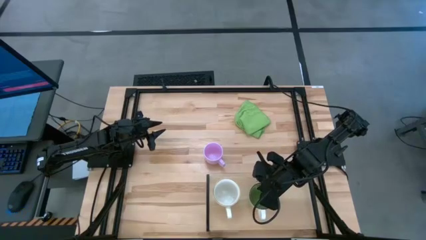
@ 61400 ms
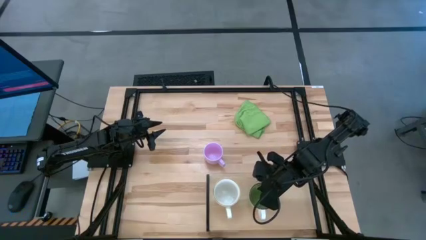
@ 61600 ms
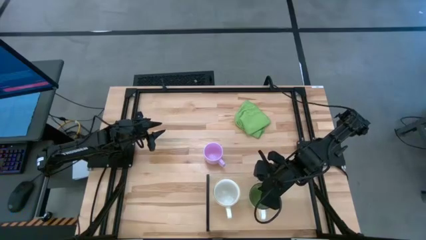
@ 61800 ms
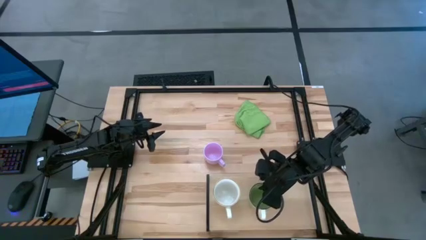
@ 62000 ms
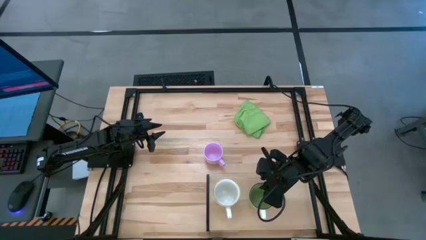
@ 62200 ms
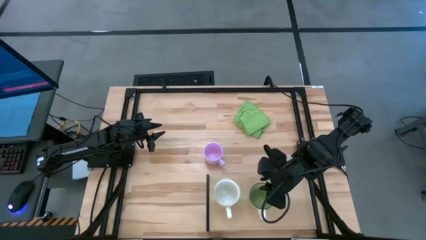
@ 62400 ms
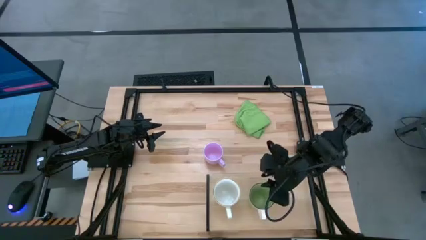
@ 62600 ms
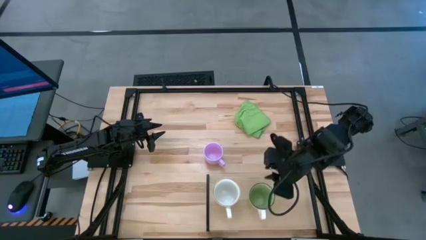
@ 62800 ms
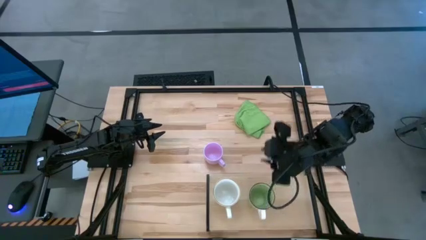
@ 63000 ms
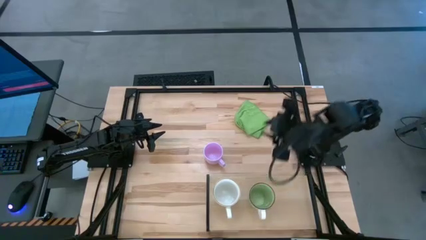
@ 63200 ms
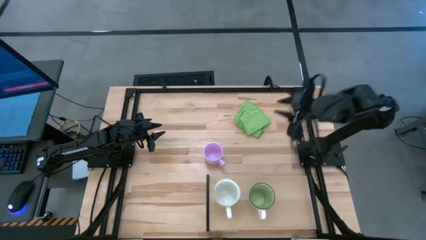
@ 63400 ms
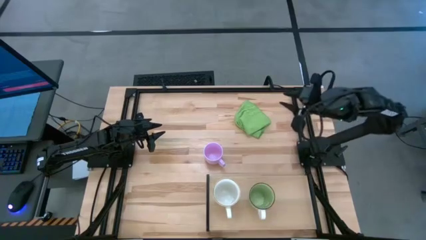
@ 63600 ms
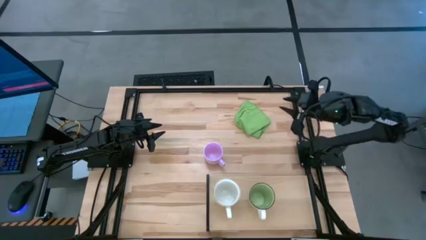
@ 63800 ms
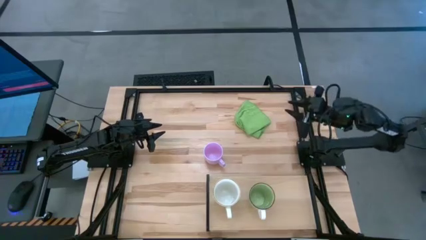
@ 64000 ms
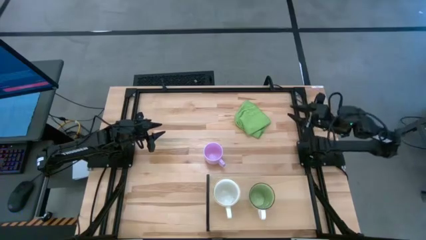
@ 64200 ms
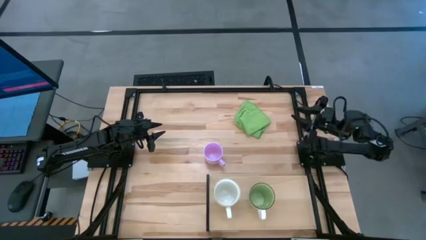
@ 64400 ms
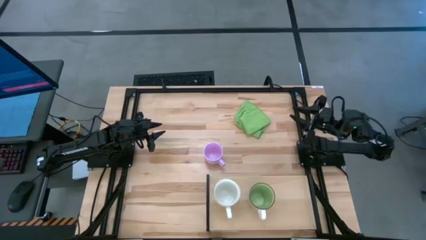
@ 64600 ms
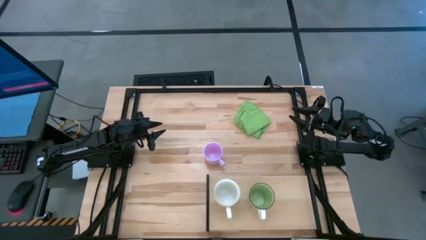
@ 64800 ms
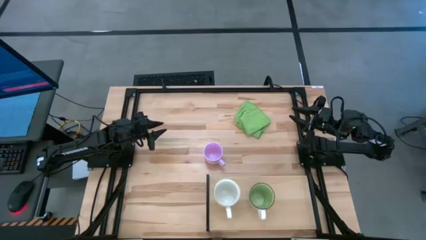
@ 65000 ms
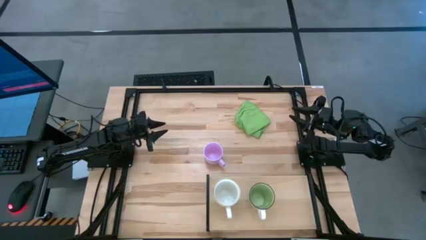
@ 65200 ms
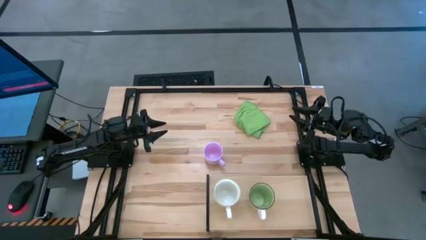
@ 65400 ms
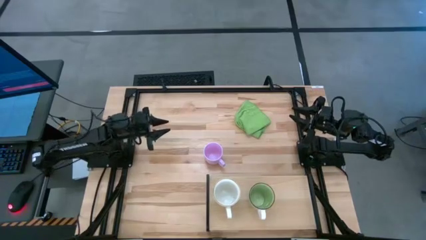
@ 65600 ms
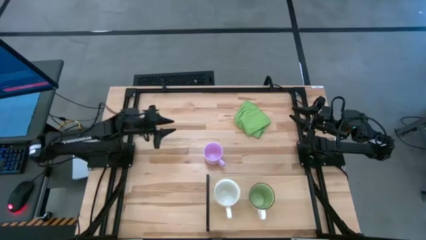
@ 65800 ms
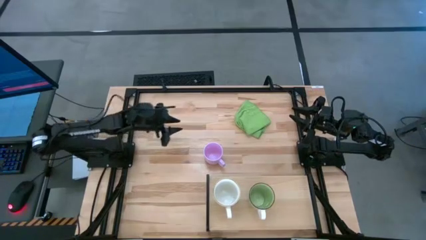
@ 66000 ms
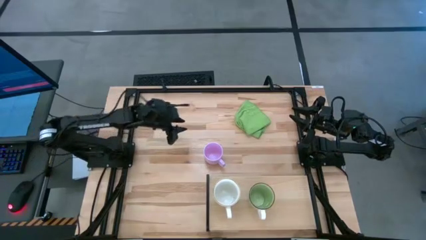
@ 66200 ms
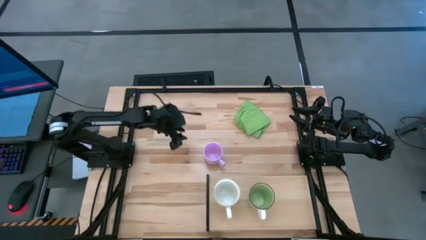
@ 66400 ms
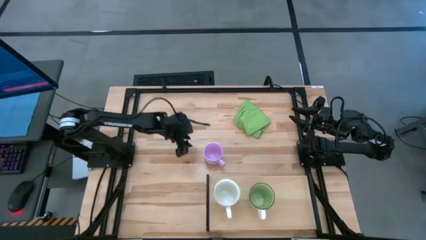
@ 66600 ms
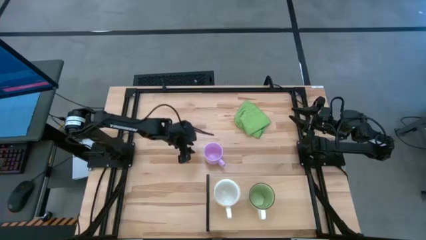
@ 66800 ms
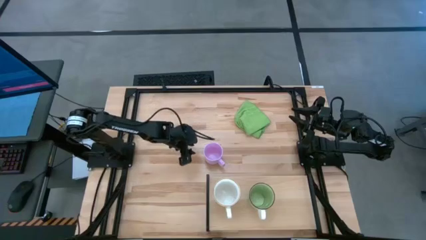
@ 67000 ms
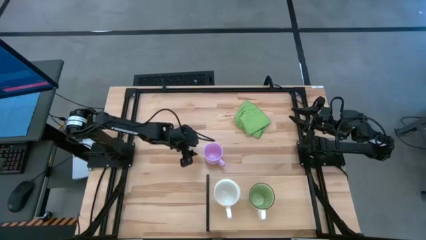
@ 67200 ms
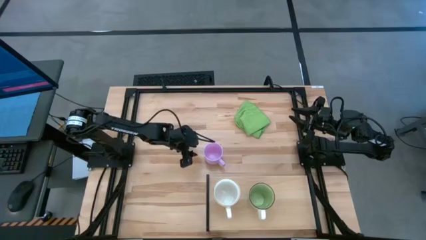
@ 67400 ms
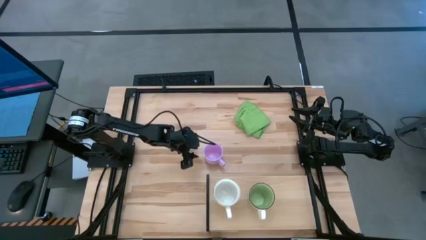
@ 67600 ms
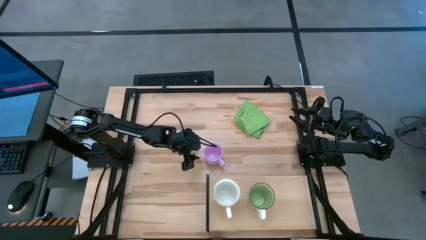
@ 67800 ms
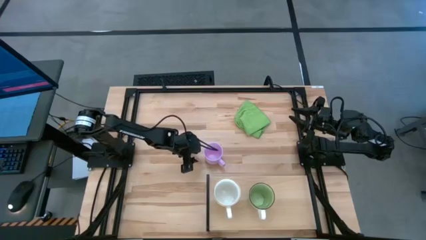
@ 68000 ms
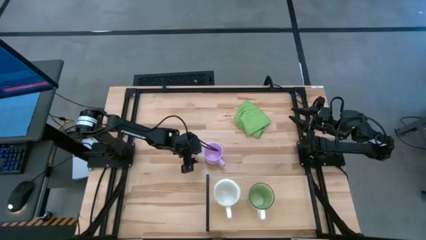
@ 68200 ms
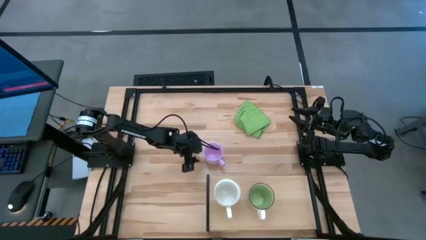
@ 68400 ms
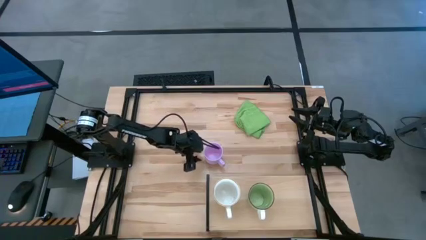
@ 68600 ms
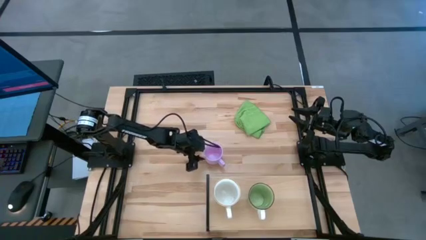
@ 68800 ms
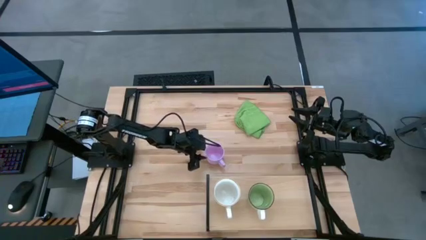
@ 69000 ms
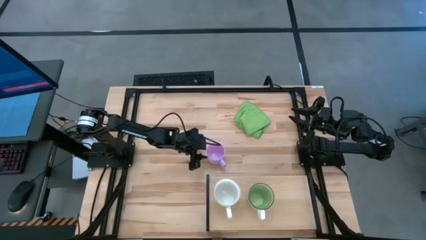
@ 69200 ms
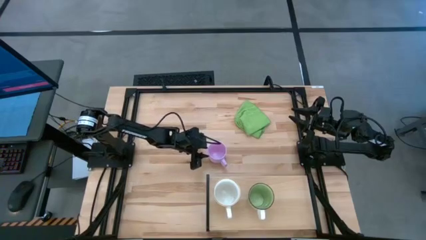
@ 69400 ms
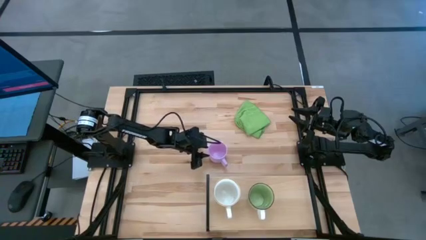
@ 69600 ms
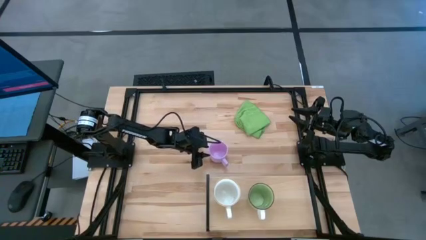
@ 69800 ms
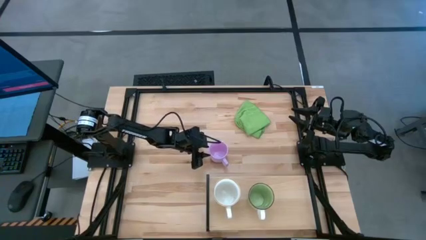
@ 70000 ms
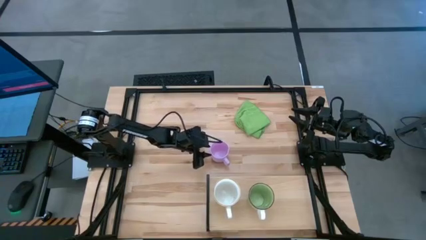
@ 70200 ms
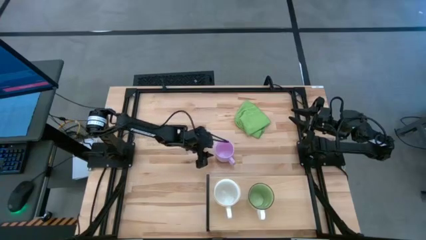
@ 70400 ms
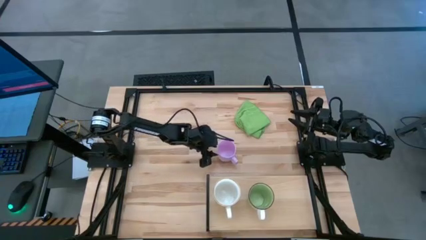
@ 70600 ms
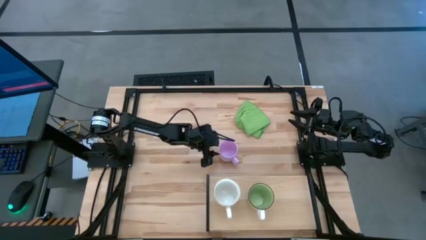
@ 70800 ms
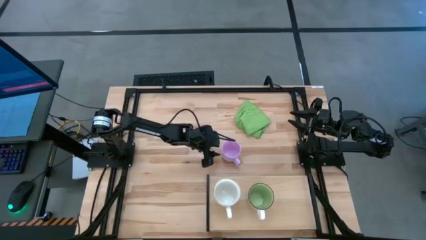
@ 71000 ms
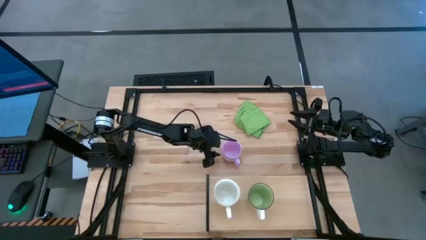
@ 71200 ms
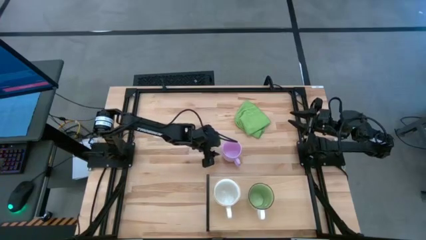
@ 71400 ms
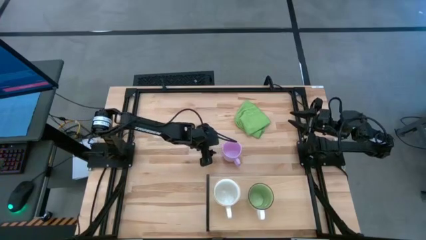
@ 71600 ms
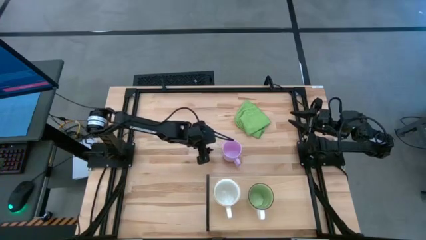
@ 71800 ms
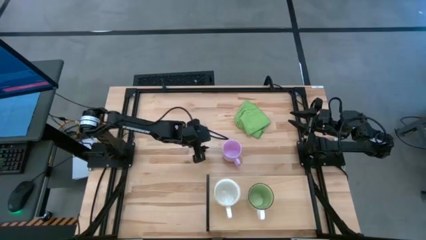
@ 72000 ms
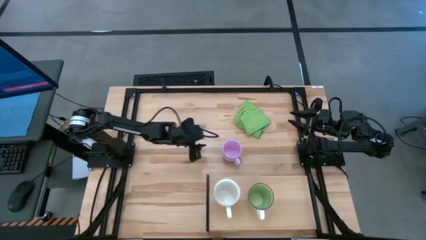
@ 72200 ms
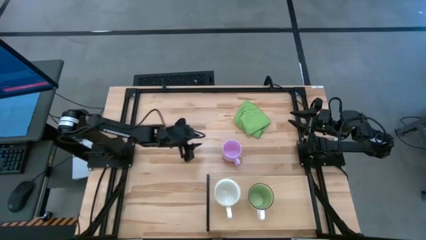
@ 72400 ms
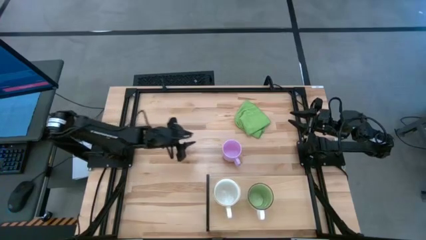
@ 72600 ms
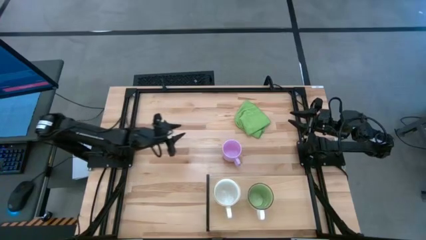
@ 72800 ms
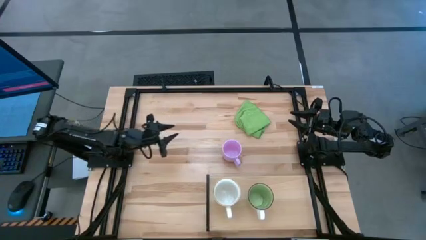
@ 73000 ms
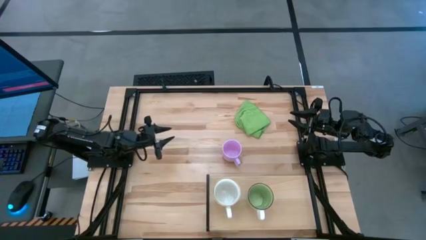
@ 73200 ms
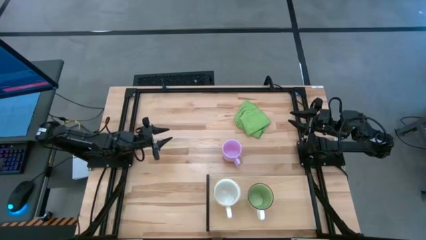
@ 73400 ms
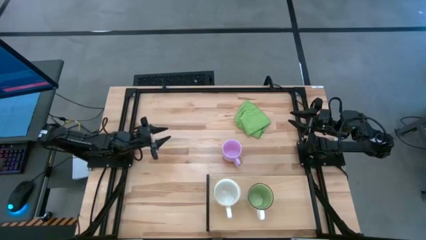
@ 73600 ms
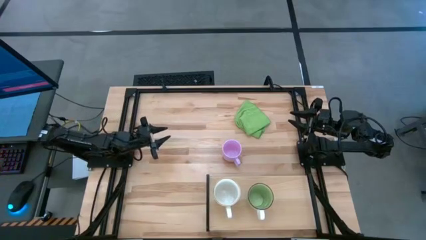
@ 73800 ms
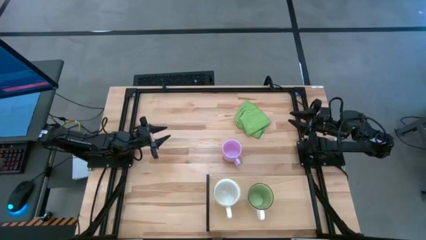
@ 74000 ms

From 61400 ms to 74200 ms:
Task: Stack small to large cups/mugs on shelf
Put the pink mug on the shelf

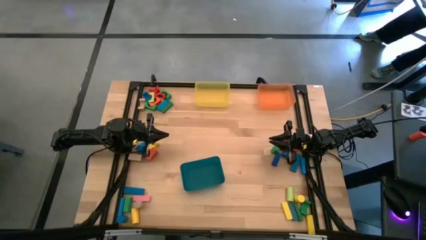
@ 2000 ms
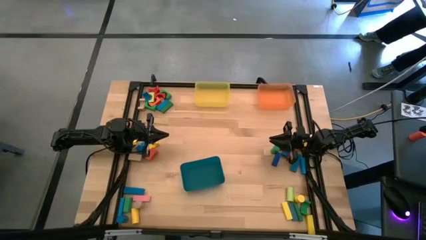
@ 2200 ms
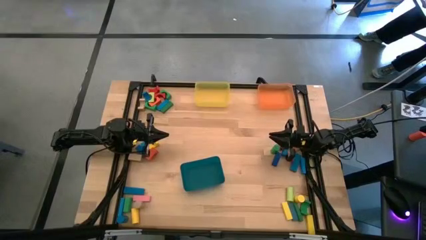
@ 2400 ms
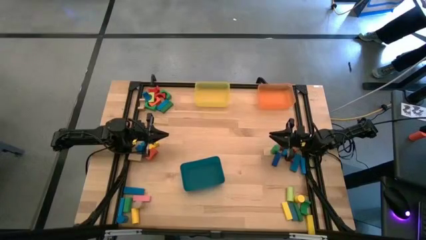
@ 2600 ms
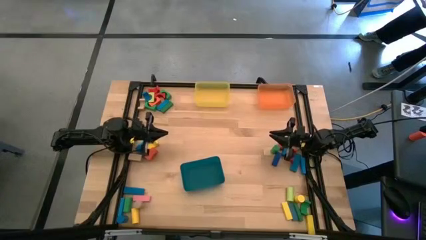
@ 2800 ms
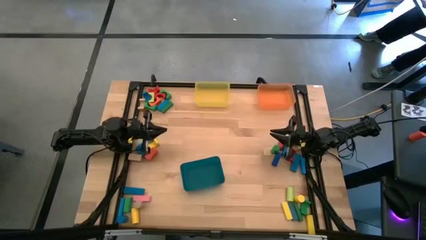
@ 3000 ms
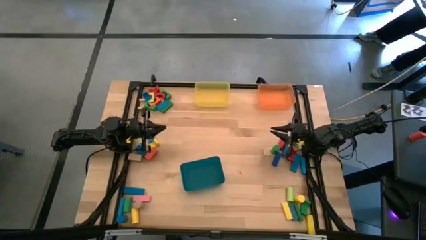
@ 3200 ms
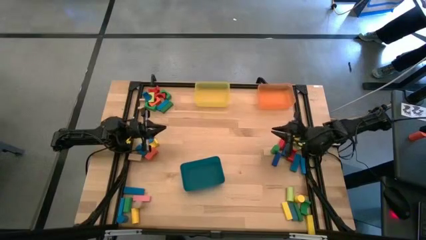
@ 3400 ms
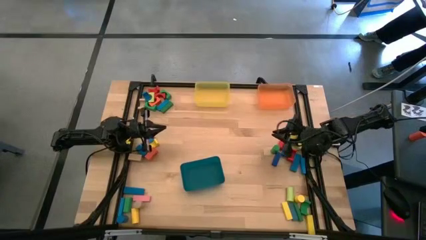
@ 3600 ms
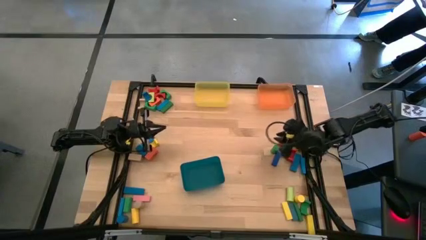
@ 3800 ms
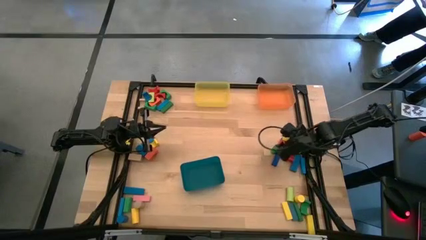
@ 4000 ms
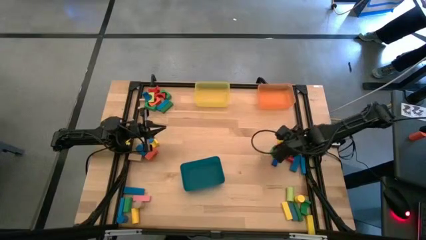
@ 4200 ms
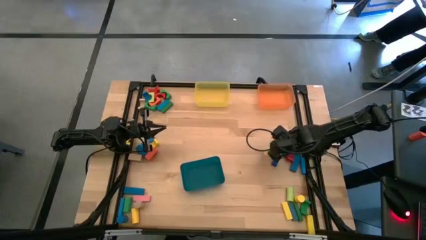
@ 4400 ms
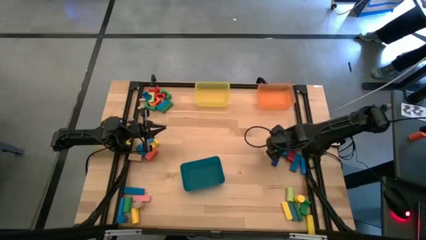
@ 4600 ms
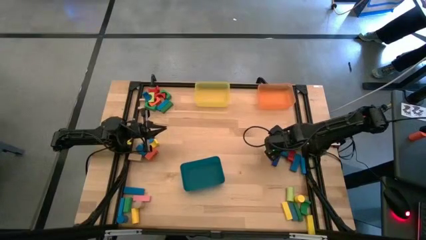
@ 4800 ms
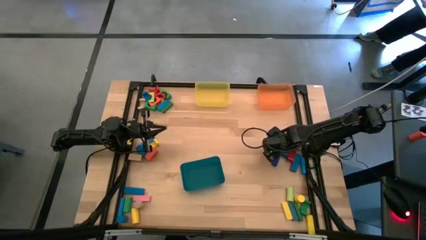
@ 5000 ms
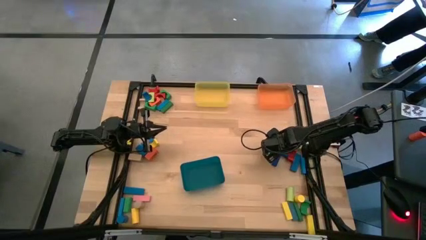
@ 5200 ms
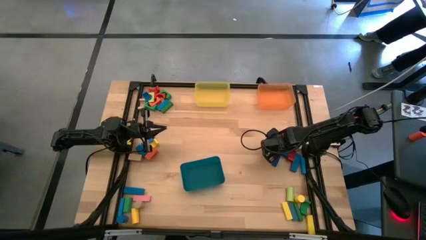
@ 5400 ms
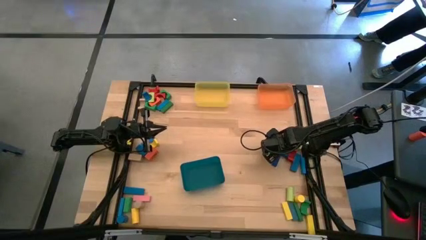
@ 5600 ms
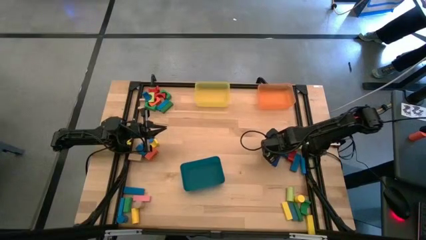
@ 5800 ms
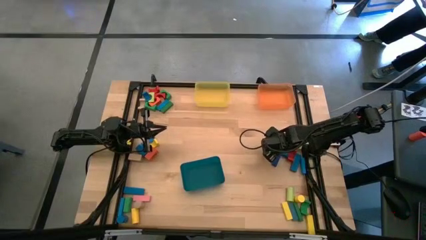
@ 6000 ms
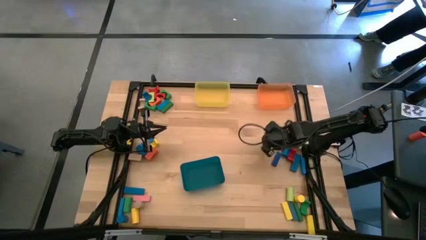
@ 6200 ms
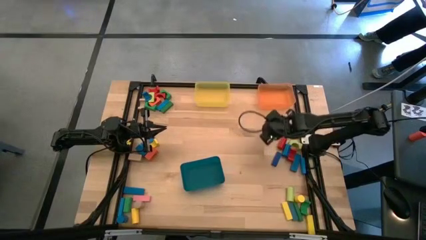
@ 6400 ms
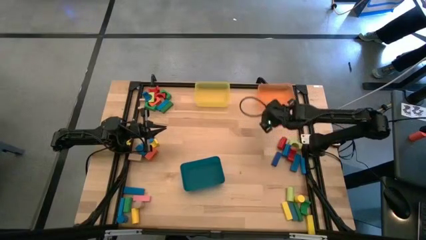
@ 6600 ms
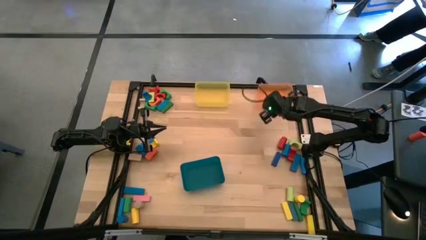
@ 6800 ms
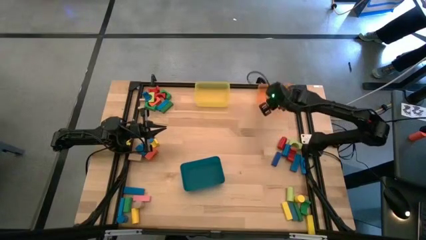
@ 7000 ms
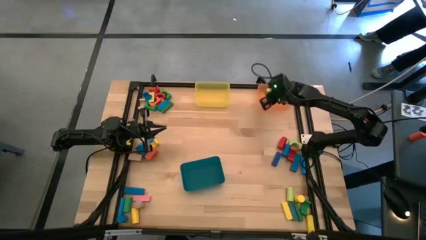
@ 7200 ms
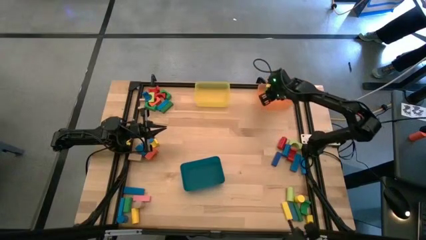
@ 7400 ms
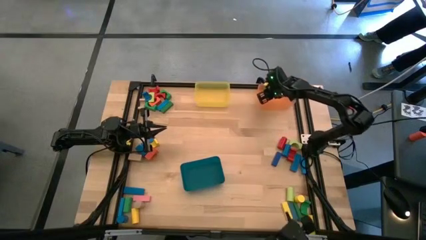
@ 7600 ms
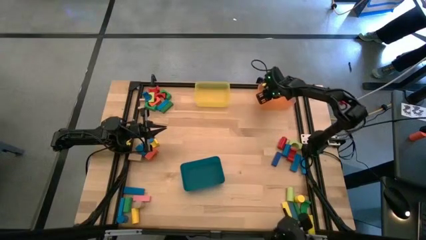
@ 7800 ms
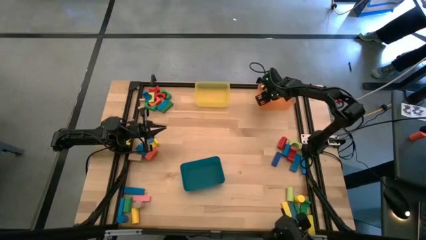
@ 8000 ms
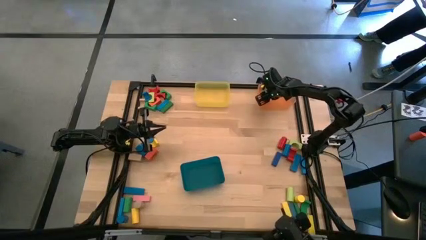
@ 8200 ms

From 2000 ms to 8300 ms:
Task: Sort blocks by size
Put the green cylindrical block into the orange bin
